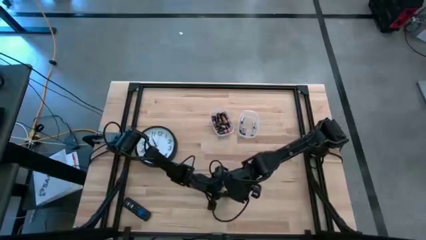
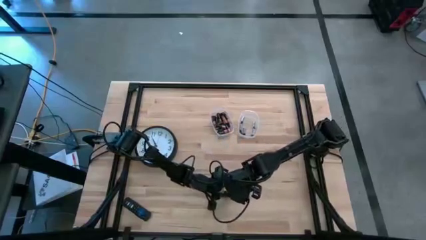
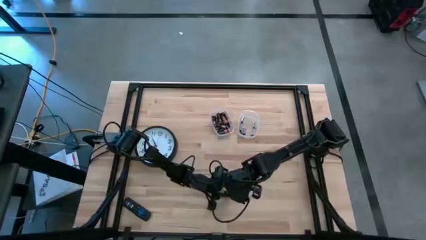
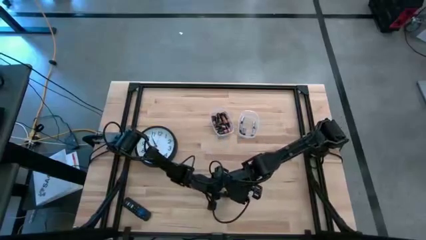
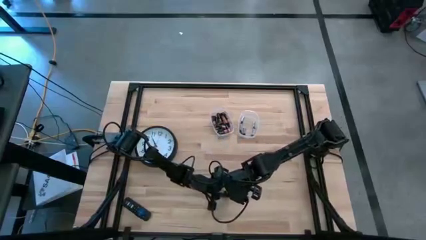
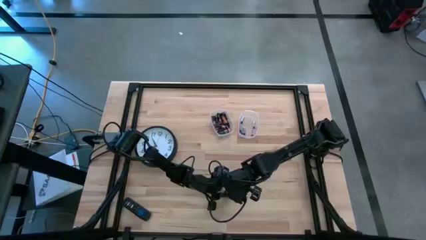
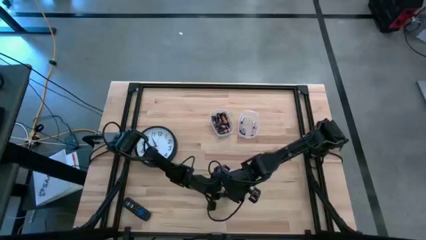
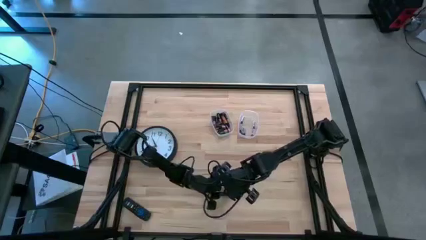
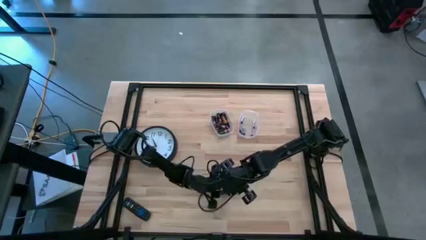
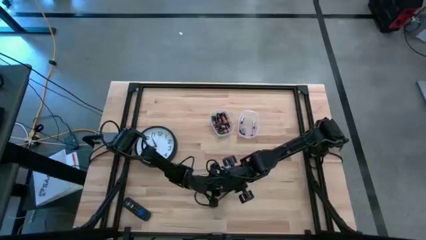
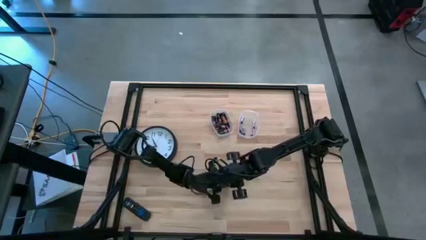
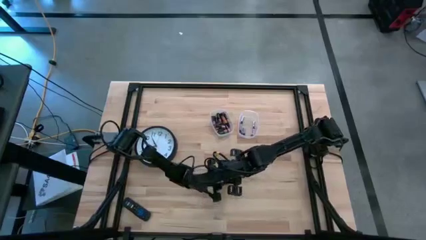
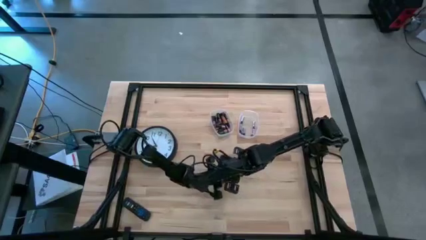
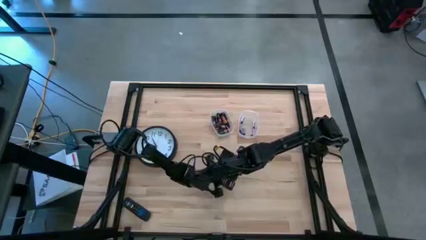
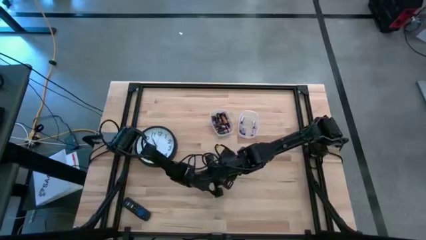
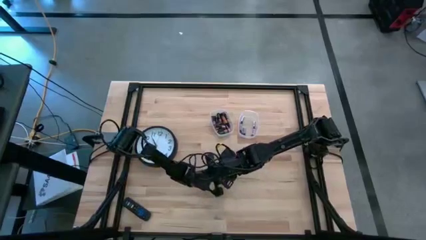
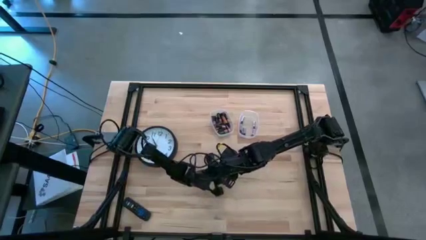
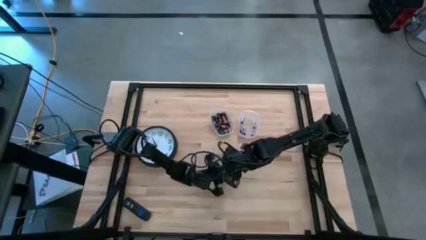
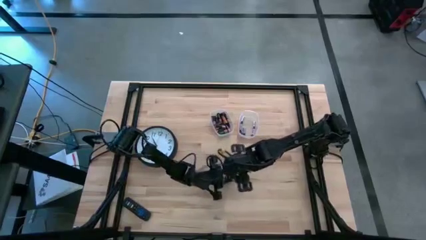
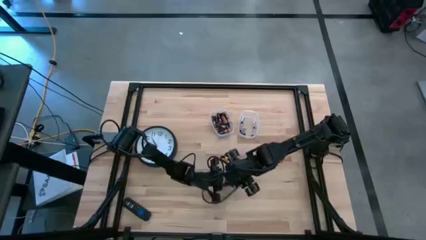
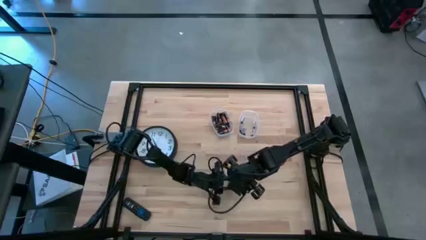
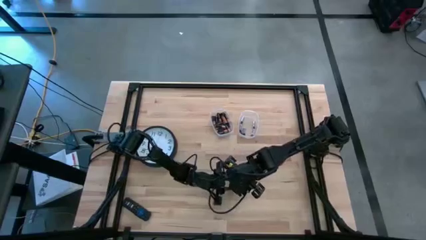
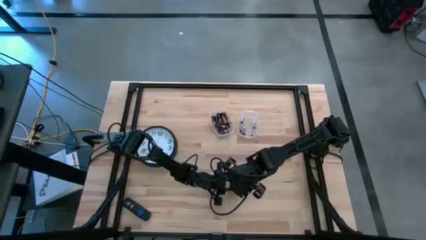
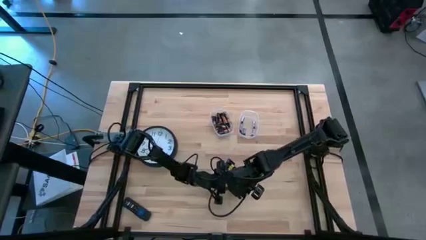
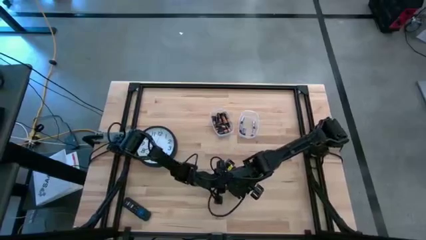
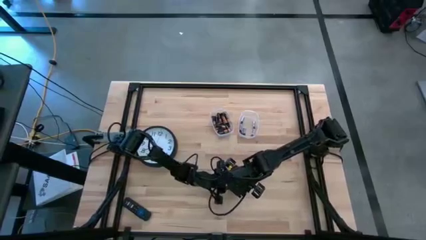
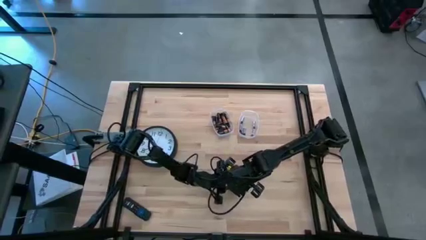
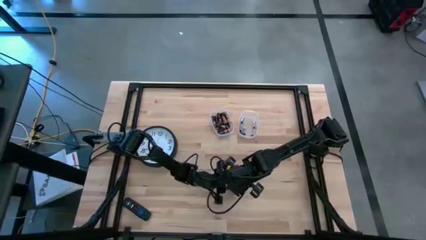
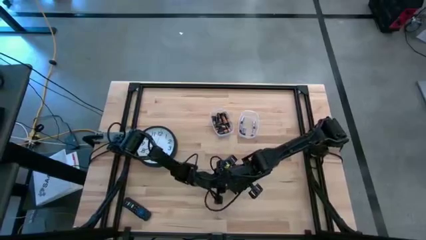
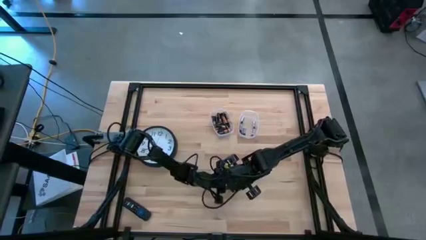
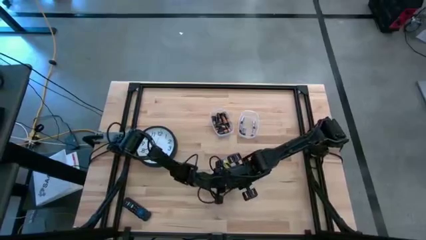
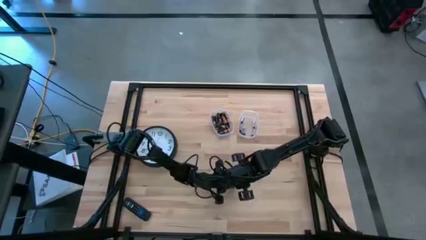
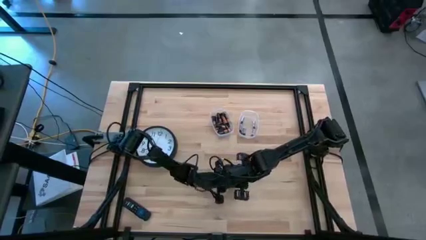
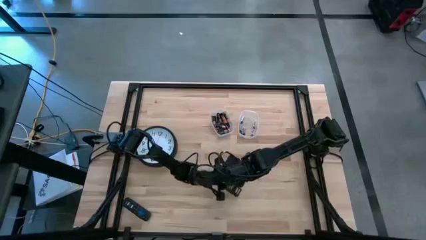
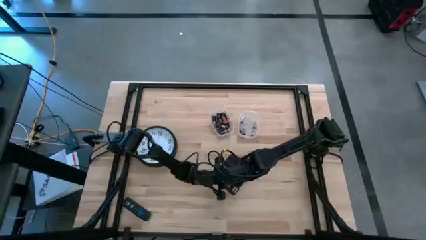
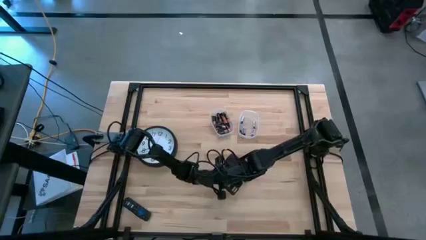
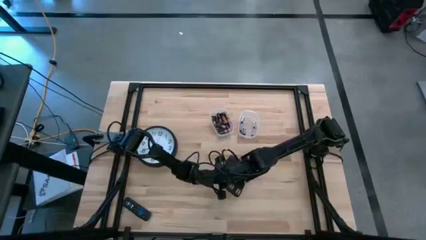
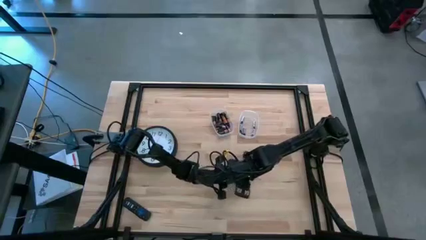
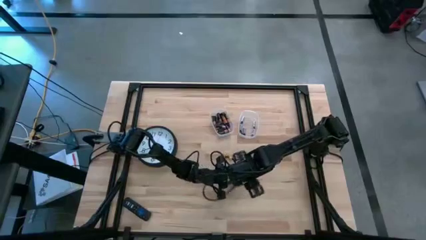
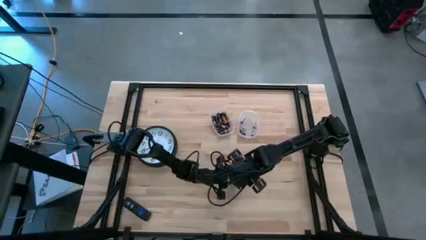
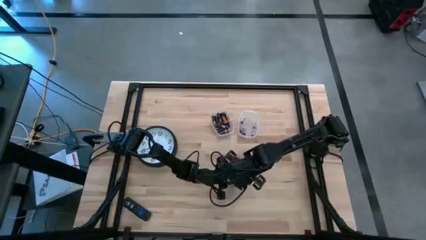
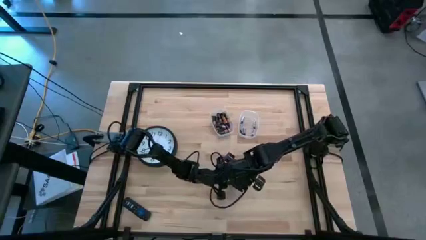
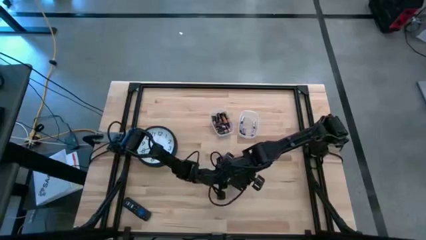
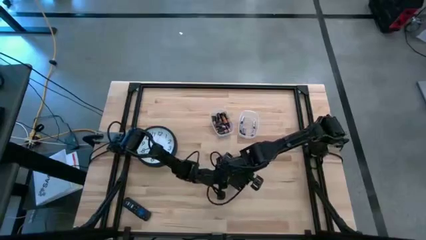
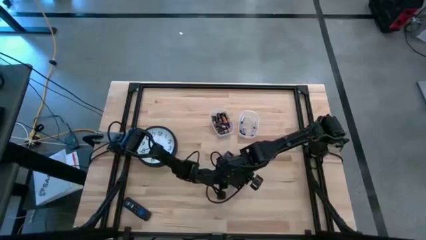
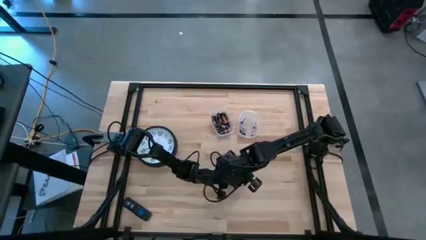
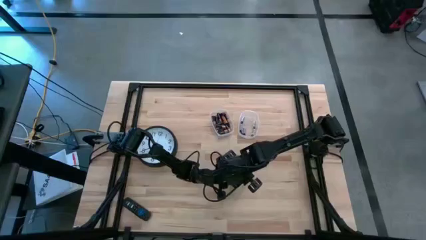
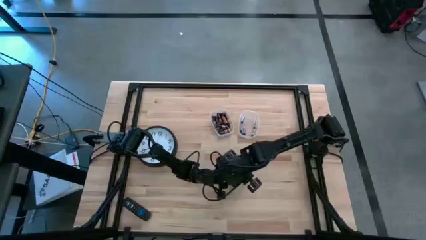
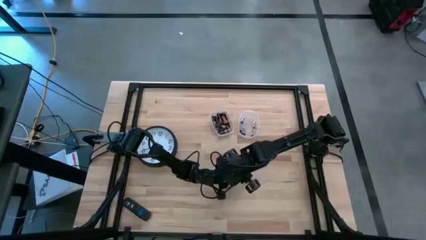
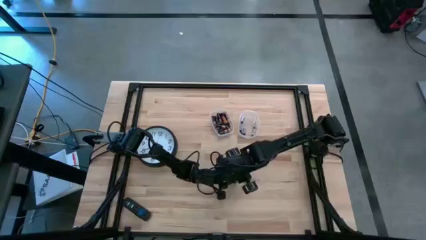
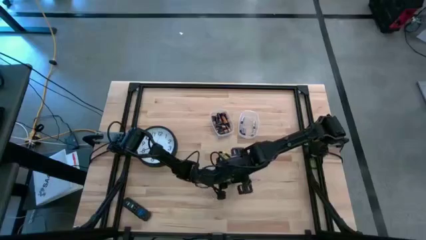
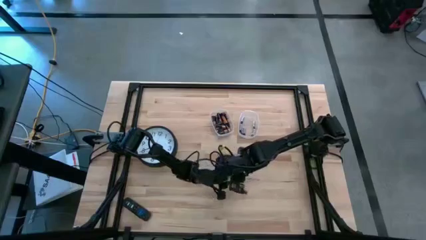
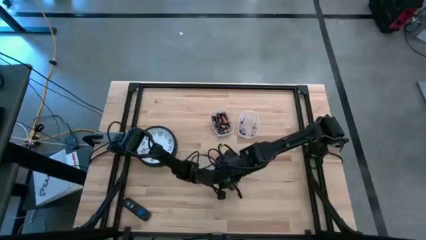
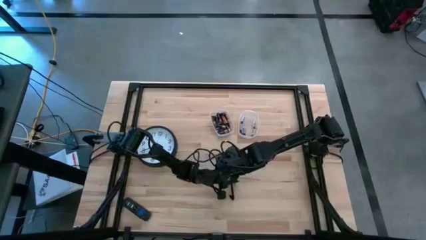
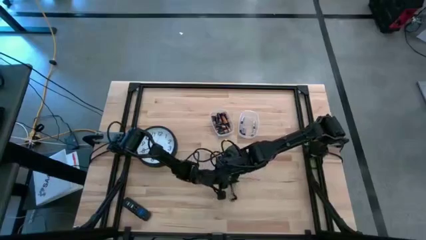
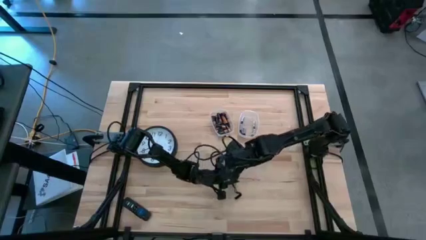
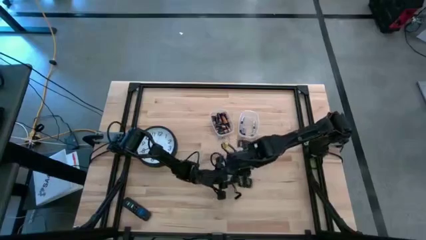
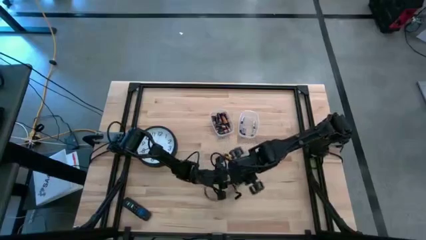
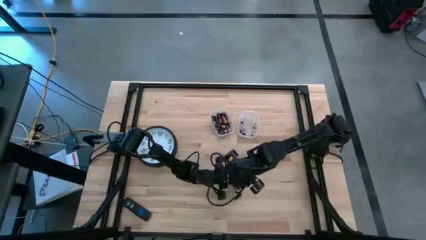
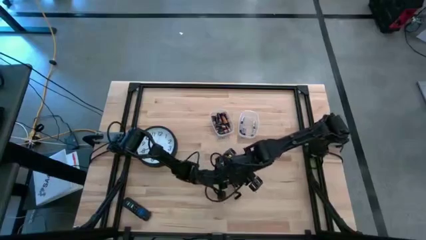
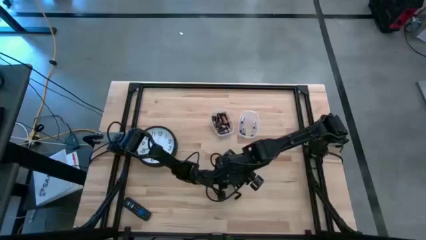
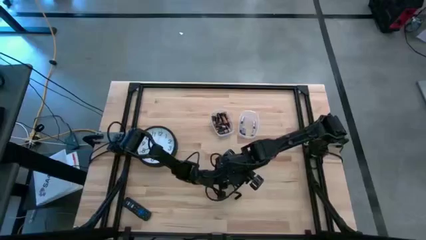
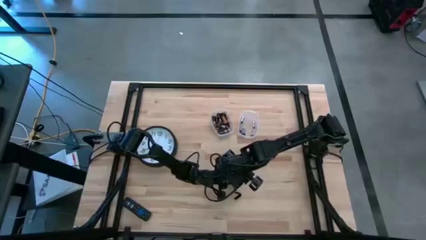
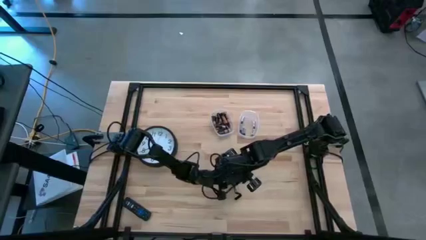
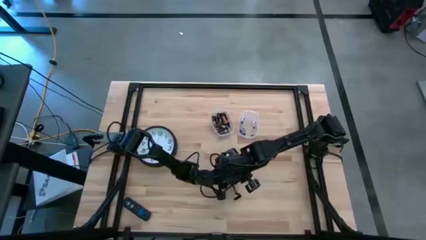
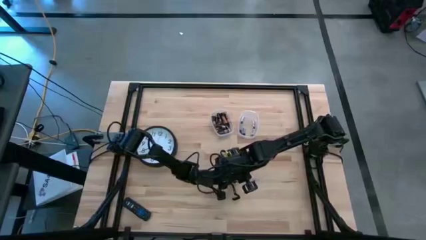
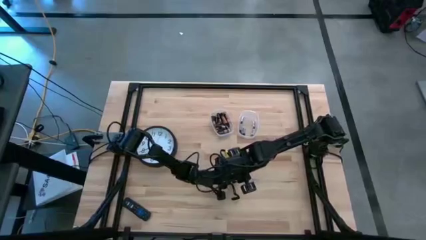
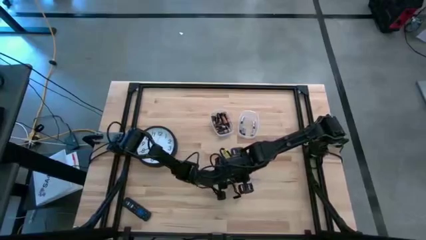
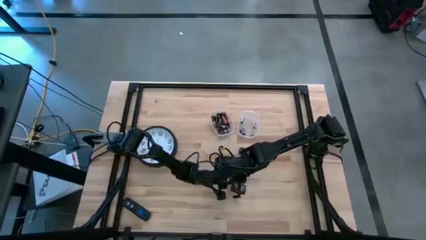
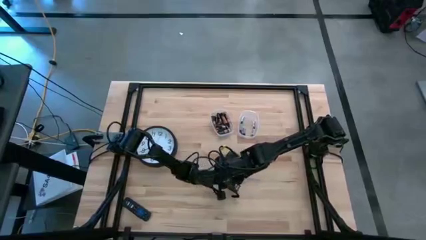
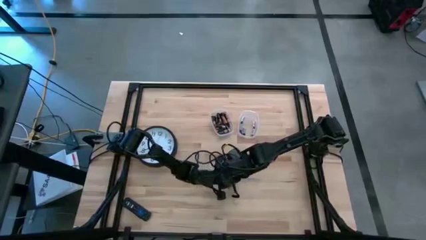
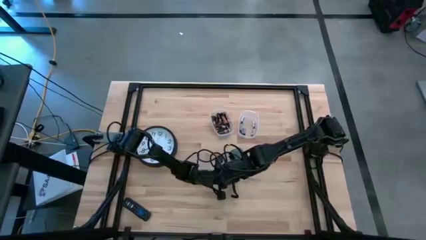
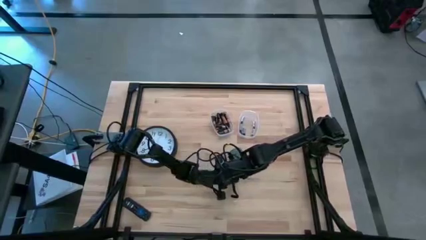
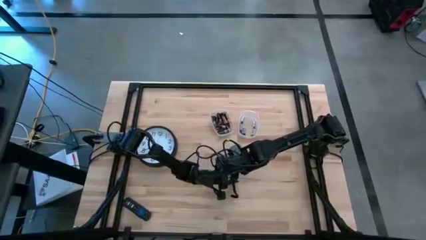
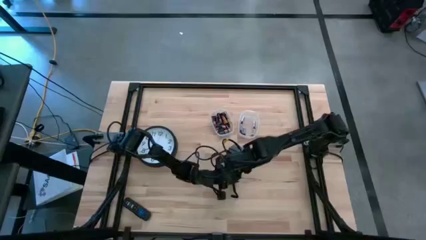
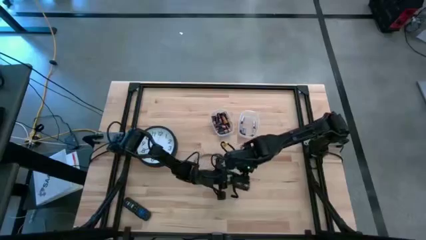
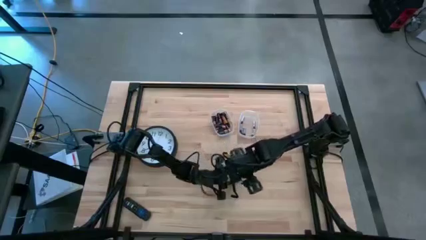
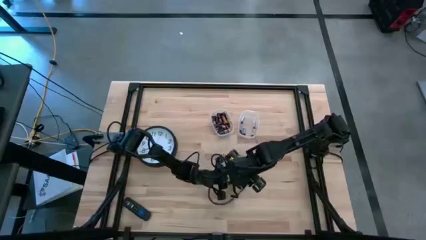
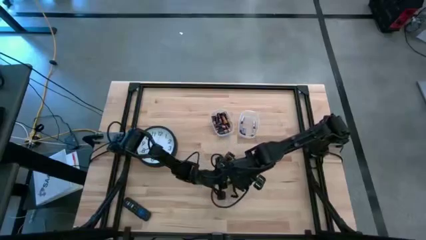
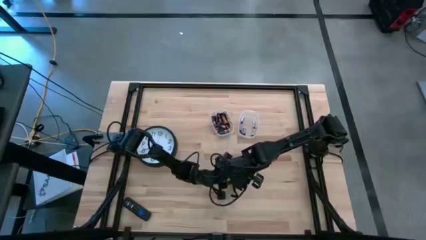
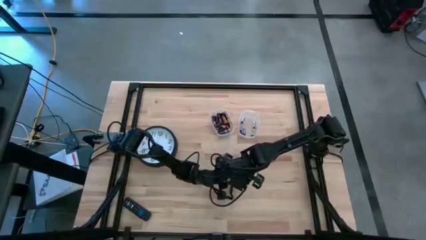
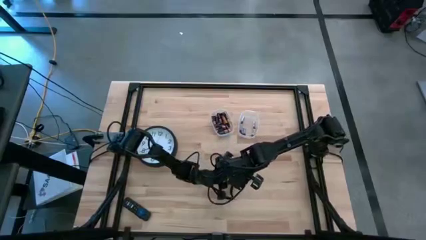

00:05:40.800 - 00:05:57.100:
Task: Insert battery
Close the lid of the black flashlight
